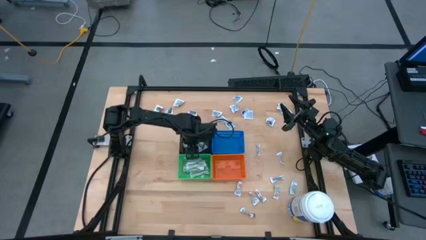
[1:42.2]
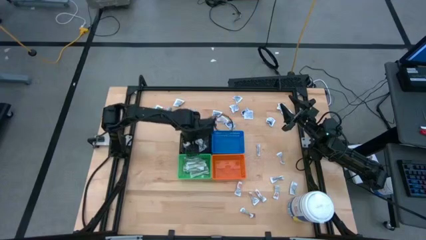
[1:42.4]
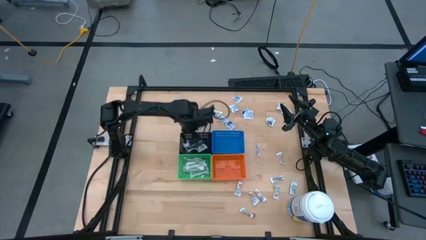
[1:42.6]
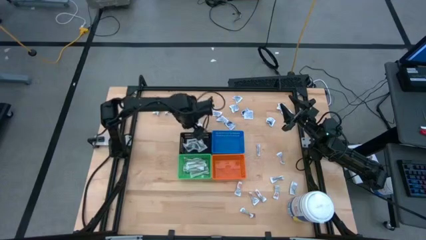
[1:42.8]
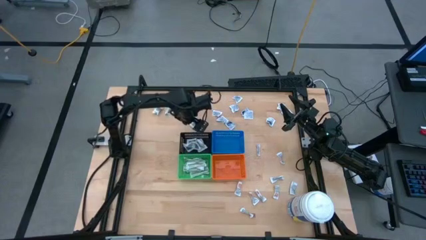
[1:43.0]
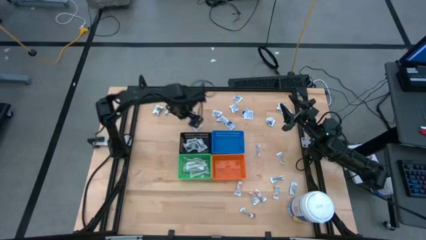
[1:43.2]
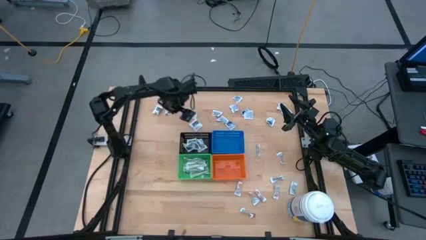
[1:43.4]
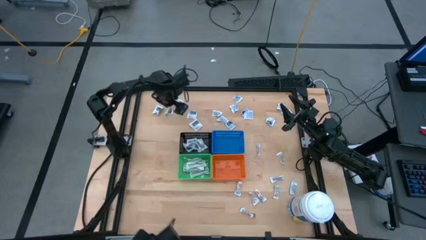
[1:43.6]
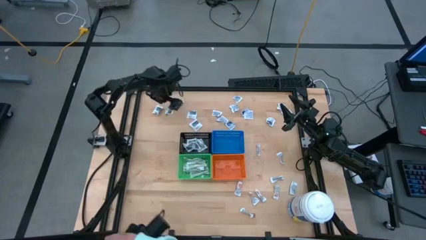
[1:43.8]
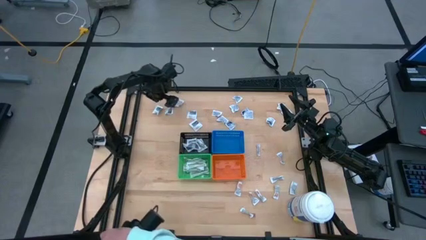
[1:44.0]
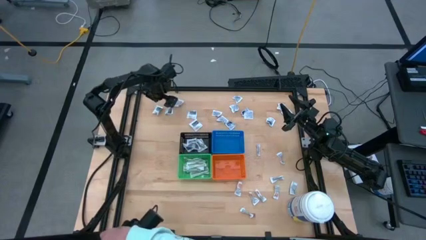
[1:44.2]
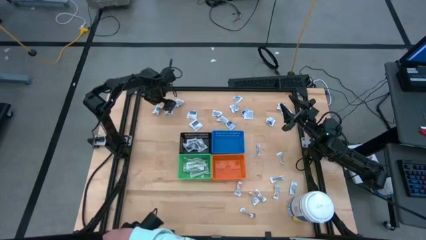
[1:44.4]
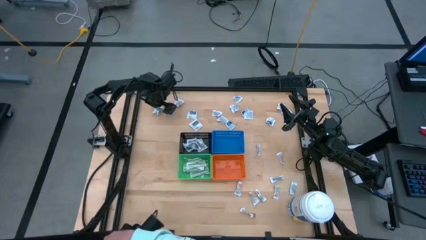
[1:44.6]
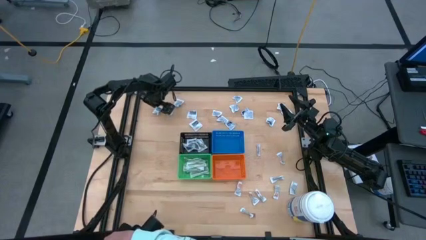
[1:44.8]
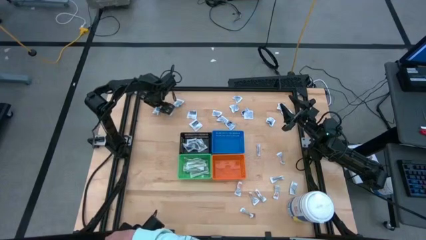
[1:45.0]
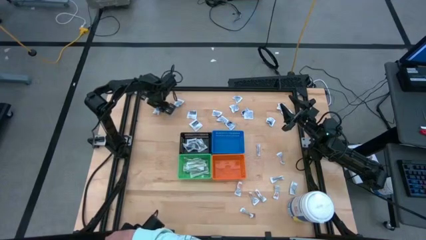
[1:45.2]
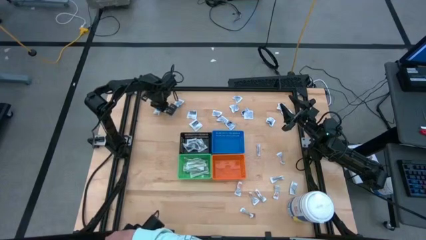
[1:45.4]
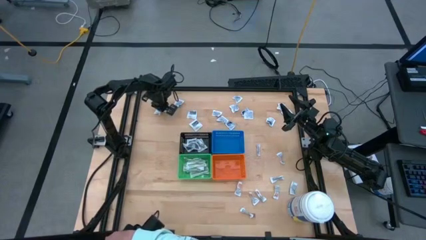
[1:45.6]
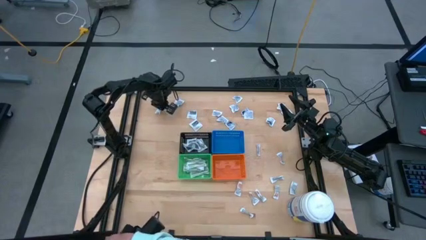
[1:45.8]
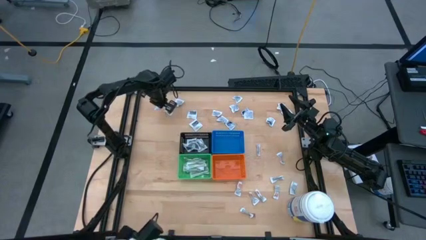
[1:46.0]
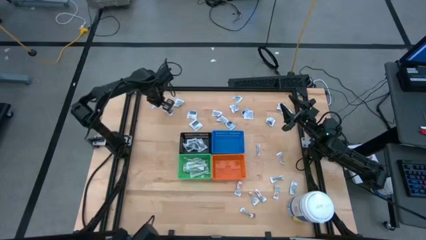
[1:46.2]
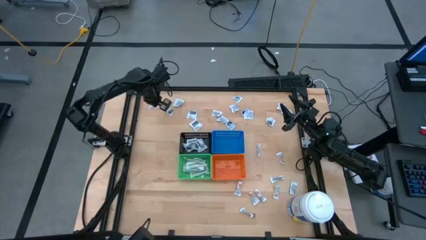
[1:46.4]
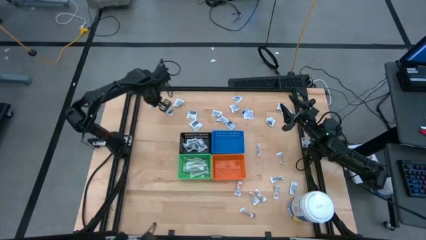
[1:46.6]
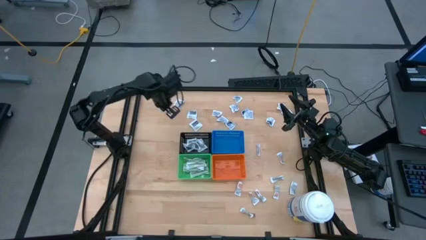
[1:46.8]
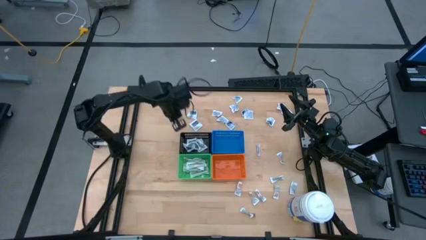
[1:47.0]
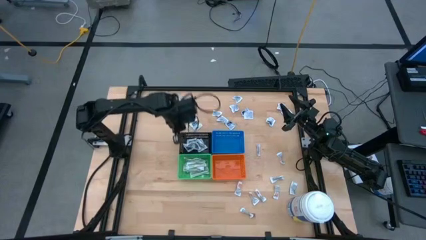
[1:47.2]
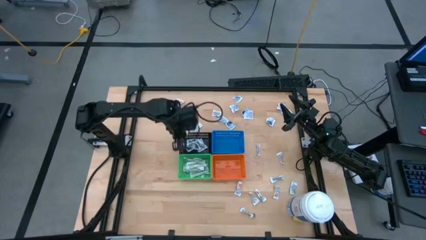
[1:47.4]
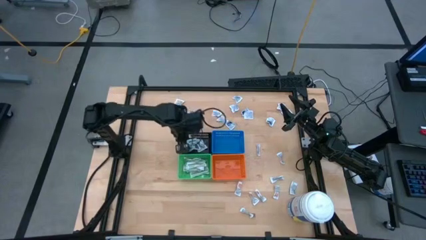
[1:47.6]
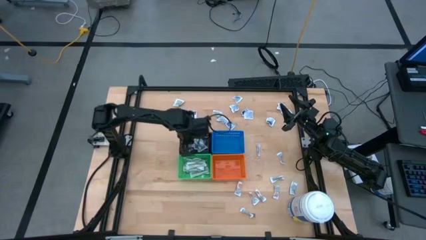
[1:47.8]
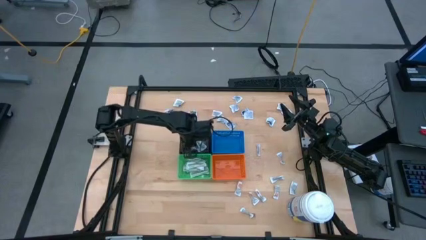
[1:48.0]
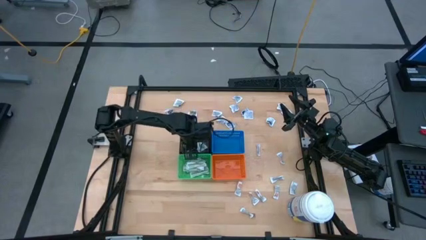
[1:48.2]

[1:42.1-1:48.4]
Task: Pick & Place First Aid Supplies
Put the towelette pack into the black bin

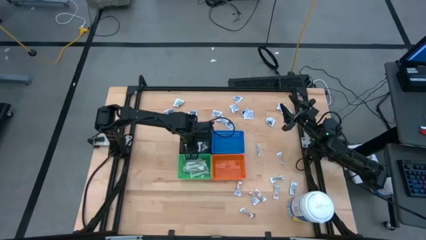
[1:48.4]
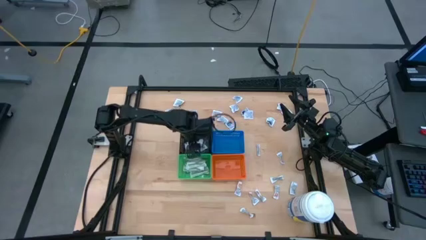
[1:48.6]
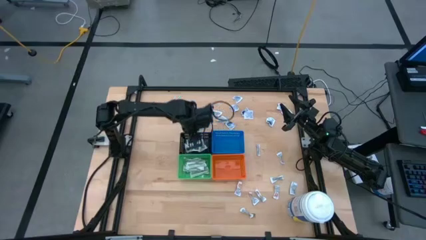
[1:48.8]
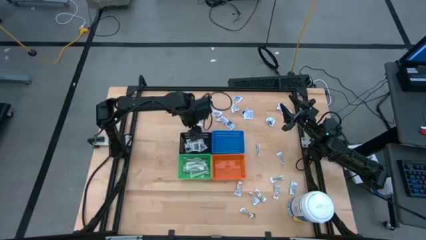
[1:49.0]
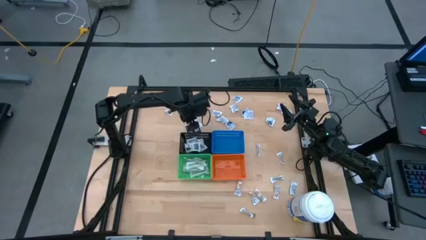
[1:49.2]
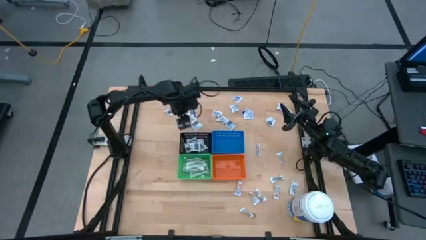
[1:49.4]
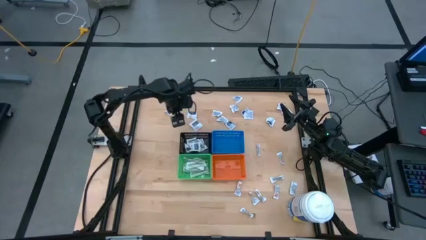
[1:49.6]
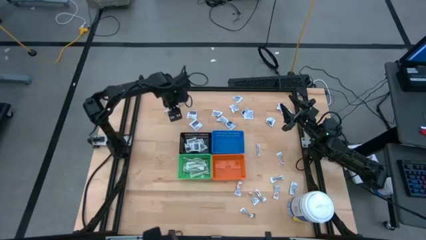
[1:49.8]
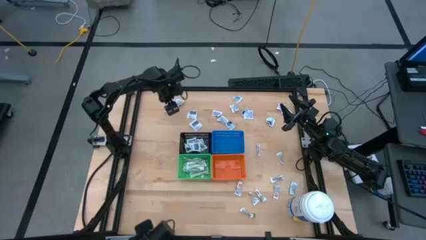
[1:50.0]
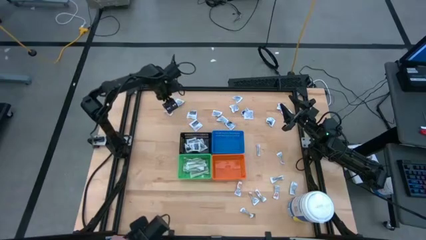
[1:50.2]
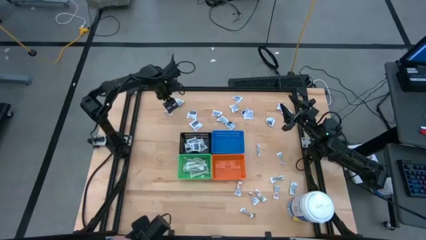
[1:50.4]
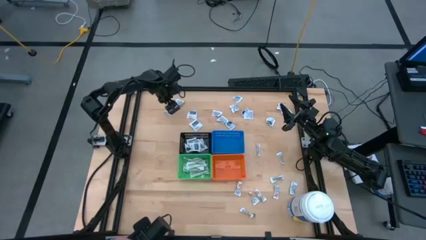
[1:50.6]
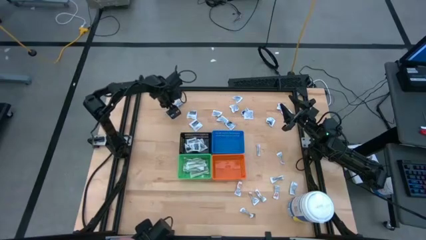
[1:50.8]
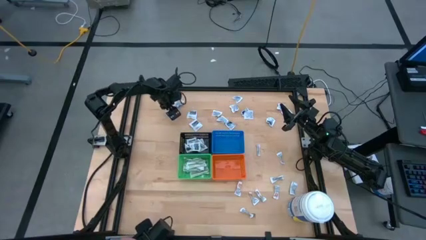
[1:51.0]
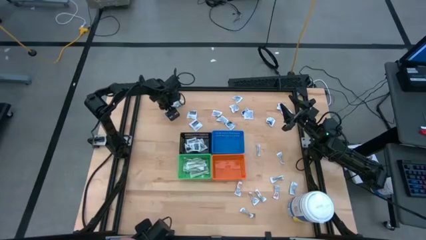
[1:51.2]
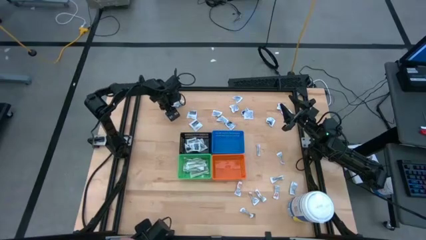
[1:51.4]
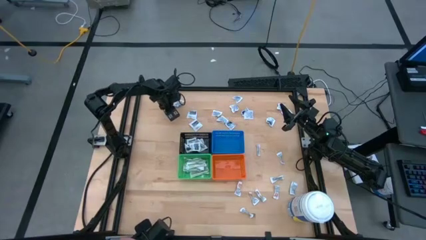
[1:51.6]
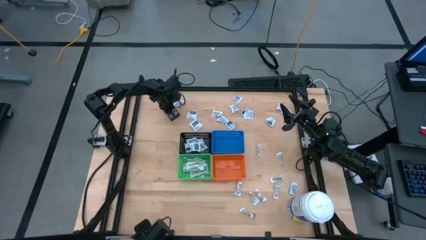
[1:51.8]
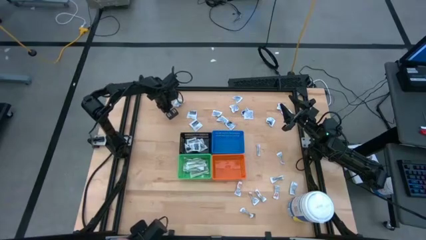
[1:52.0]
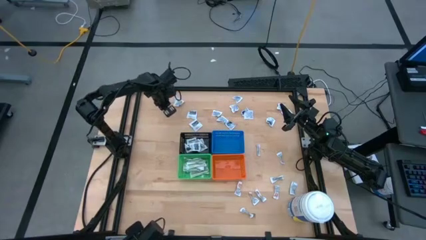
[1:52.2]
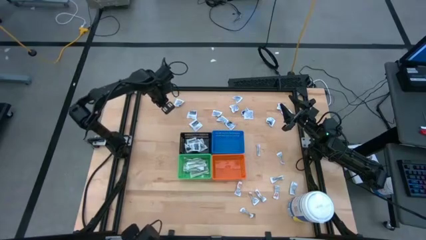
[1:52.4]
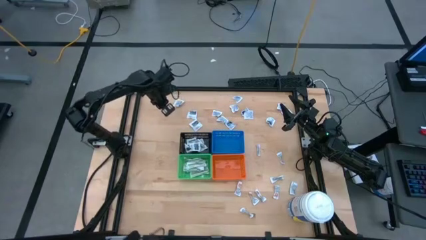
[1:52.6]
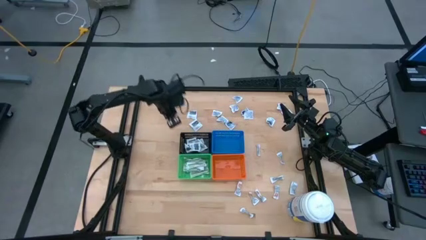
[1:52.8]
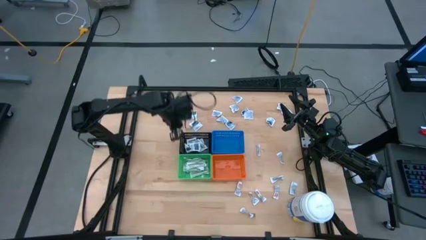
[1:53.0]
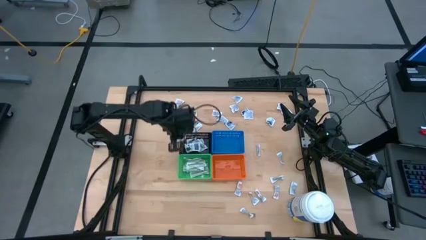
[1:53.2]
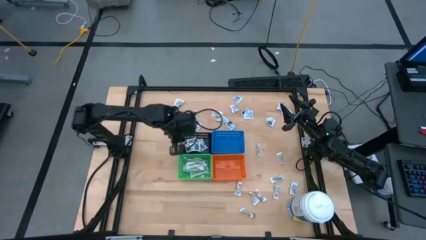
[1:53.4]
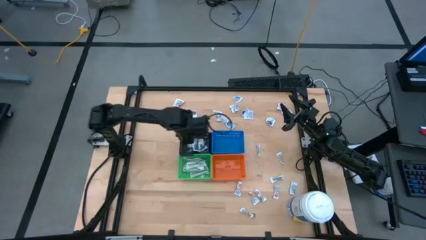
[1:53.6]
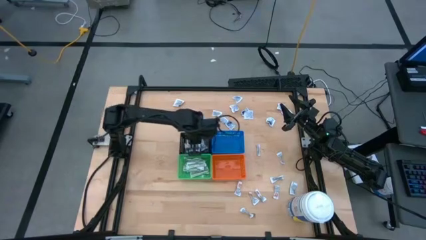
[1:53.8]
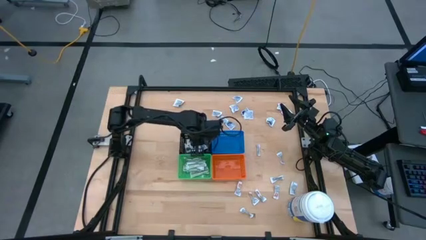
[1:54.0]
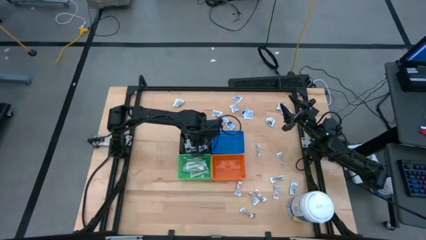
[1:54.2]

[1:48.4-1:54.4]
Put the towelette pack into the black bin

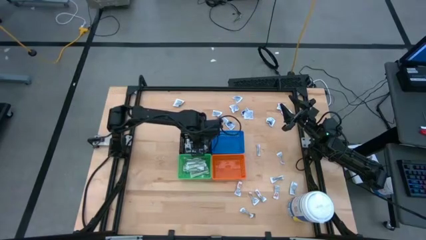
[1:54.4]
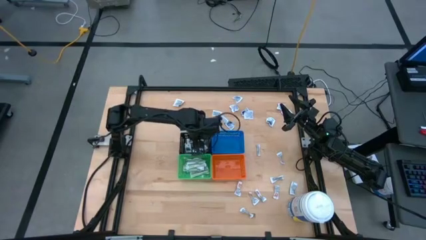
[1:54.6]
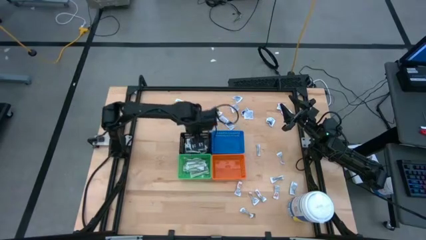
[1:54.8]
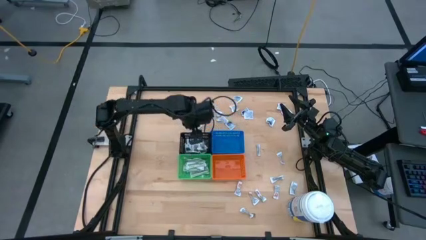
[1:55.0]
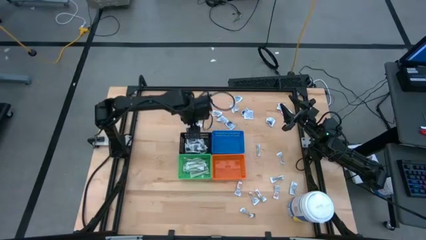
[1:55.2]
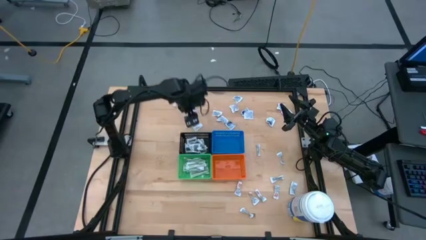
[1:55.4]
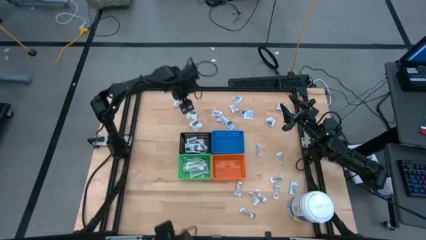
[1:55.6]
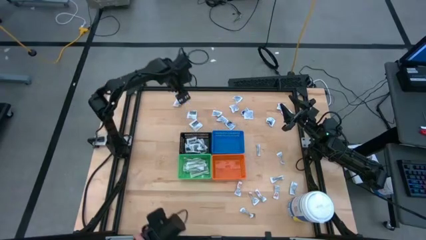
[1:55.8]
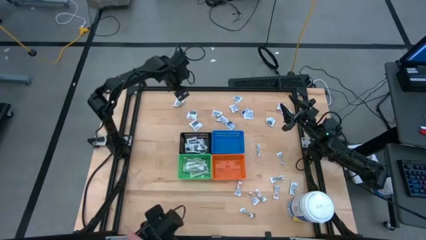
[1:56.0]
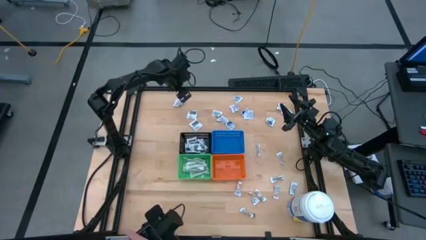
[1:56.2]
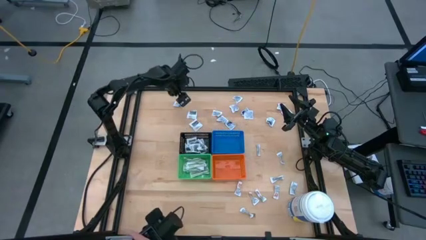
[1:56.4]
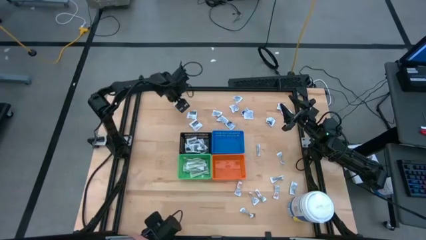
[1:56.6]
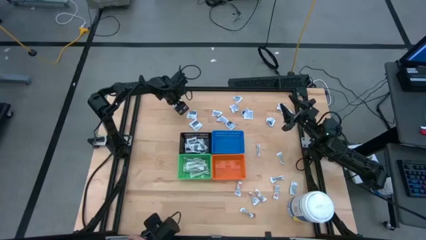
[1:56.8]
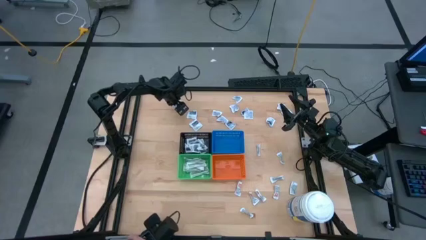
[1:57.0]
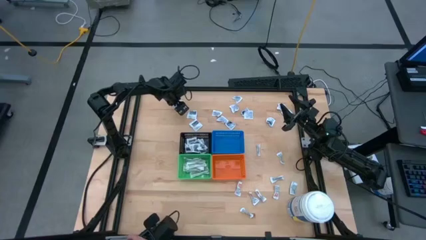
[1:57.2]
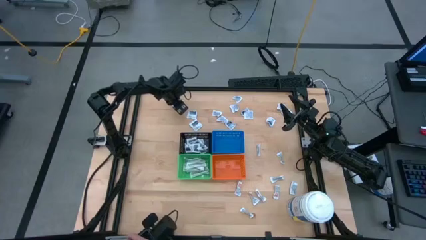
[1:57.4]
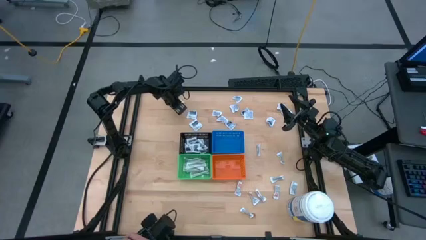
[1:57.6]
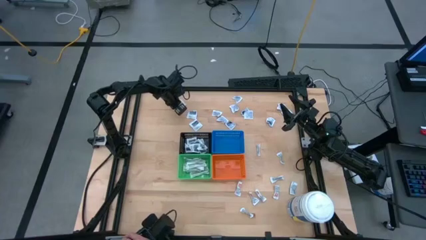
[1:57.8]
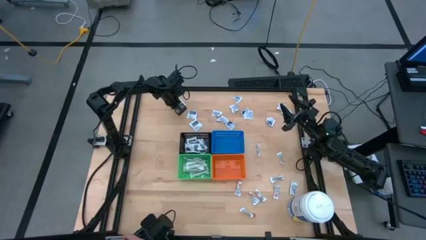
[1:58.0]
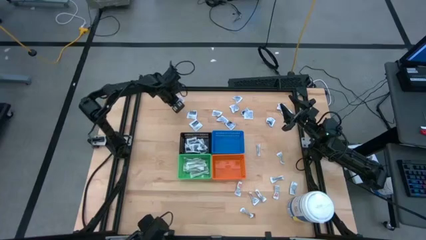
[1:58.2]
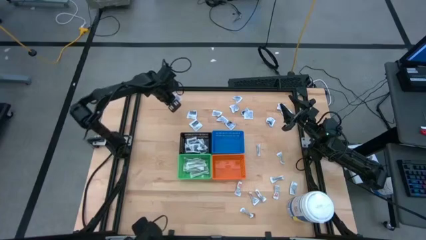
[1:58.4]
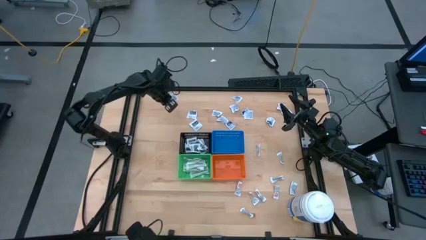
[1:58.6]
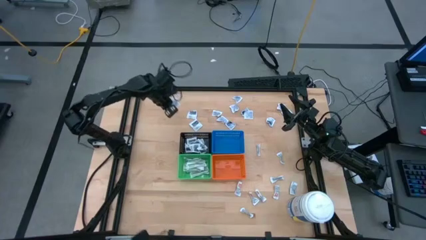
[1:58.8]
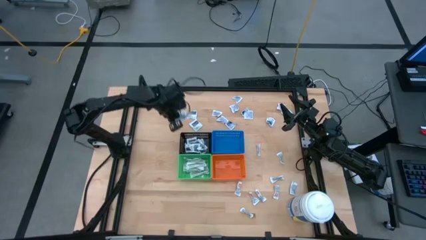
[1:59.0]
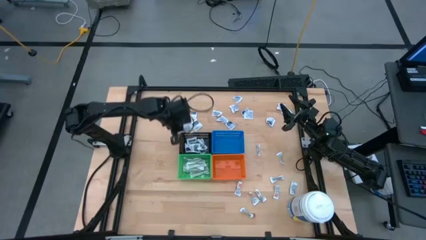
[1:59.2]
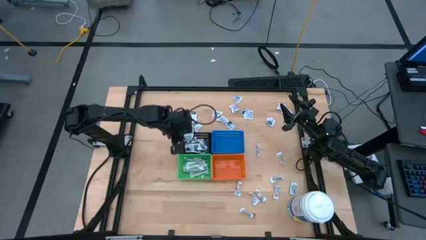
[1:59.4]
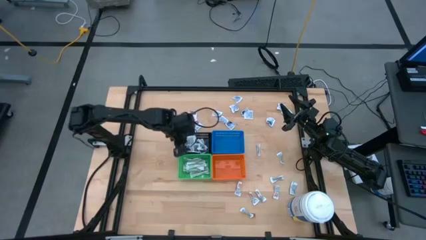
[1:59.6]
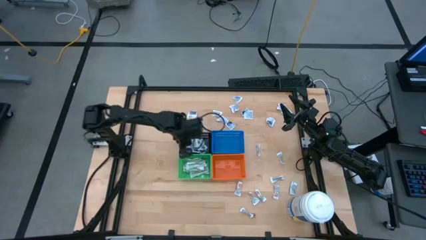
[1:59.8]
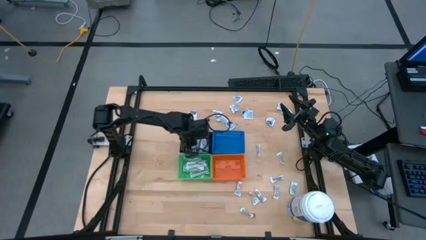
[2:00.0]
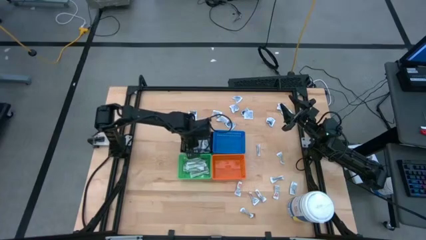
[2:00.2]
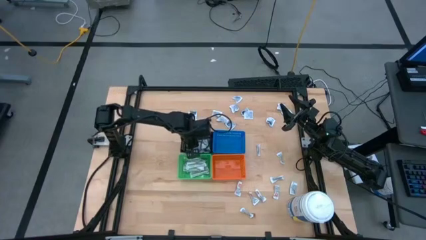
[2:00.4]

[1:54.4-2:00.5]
Put the towelette pack into the black bin
